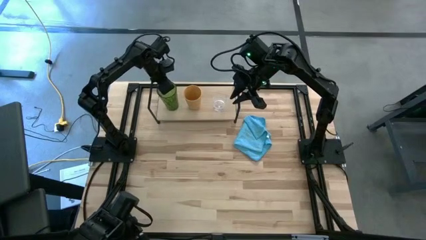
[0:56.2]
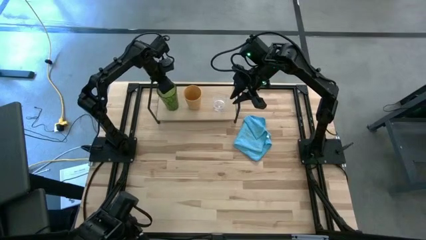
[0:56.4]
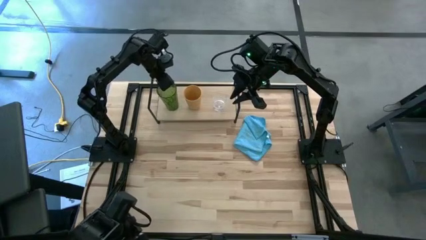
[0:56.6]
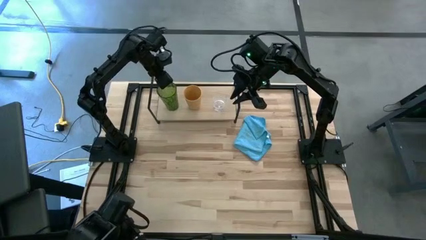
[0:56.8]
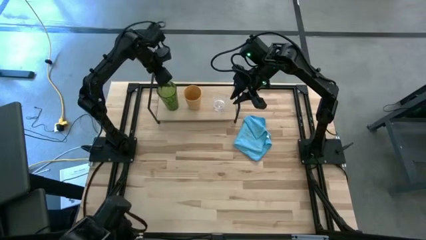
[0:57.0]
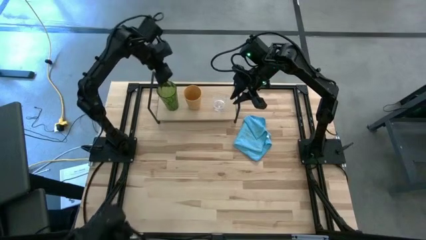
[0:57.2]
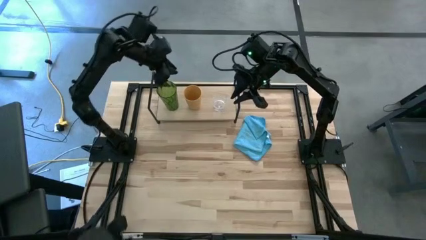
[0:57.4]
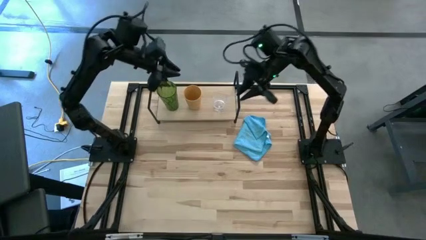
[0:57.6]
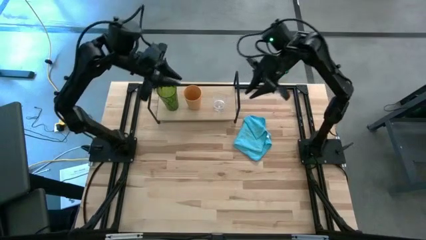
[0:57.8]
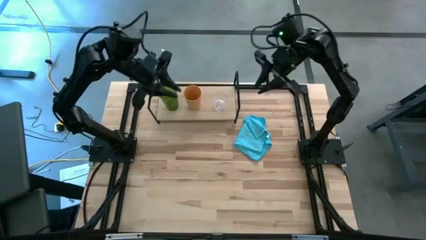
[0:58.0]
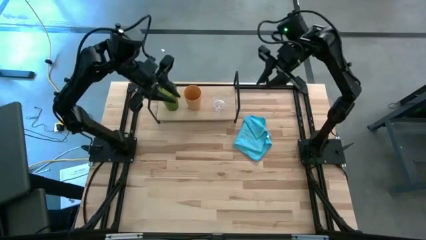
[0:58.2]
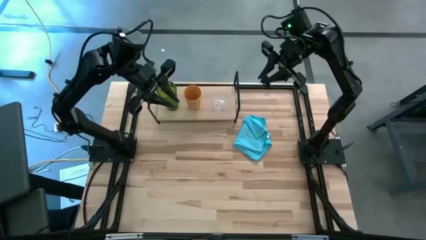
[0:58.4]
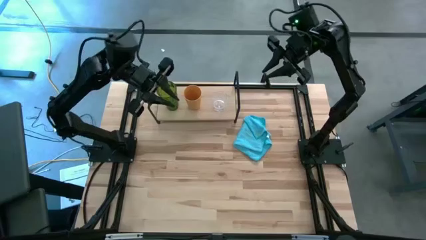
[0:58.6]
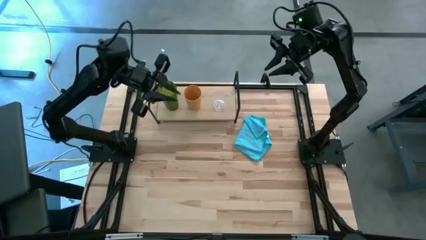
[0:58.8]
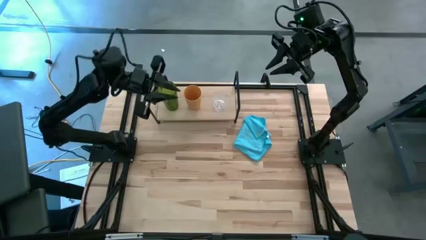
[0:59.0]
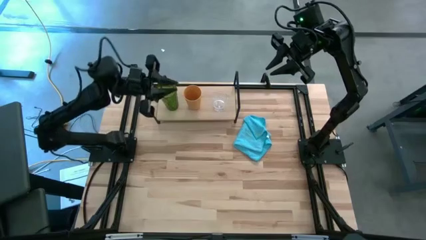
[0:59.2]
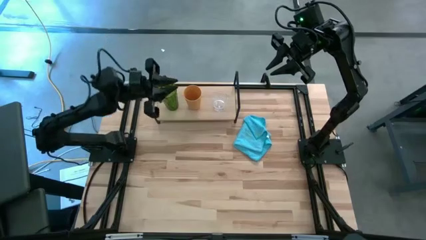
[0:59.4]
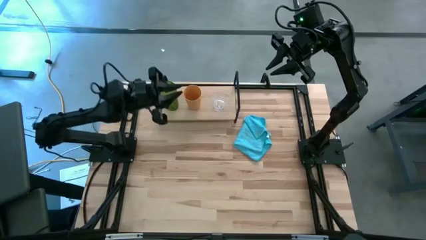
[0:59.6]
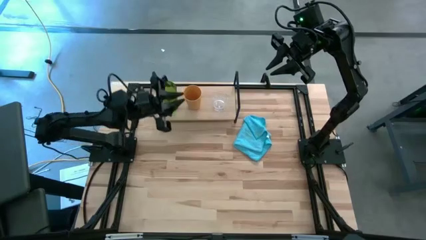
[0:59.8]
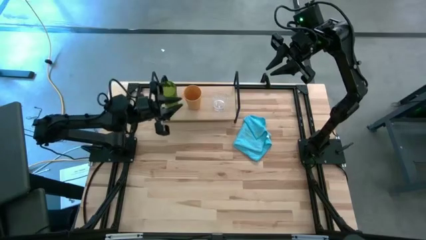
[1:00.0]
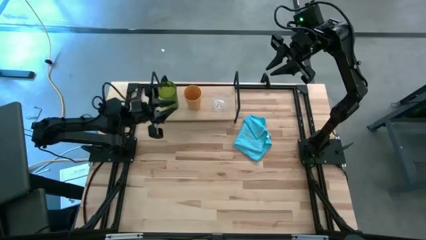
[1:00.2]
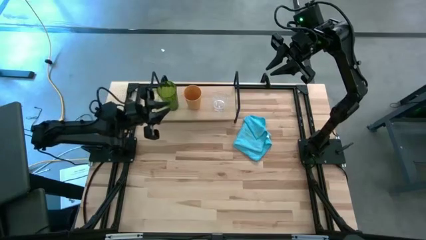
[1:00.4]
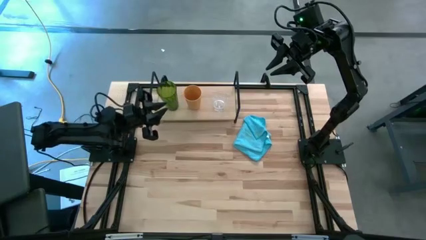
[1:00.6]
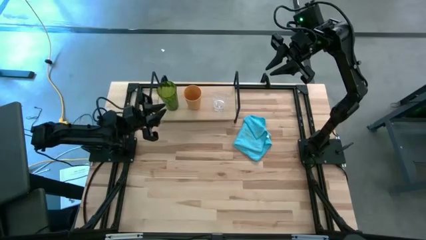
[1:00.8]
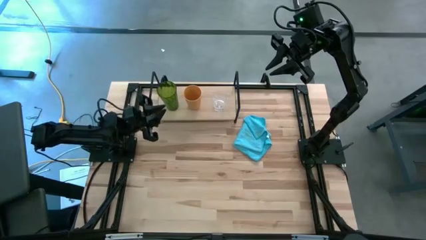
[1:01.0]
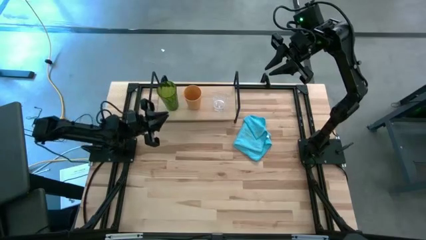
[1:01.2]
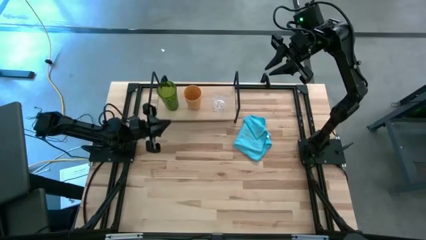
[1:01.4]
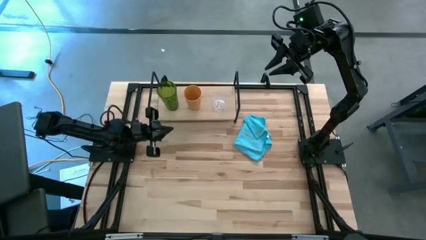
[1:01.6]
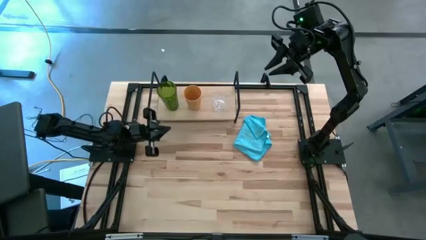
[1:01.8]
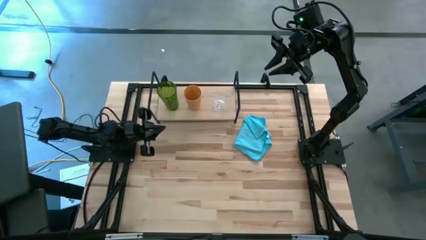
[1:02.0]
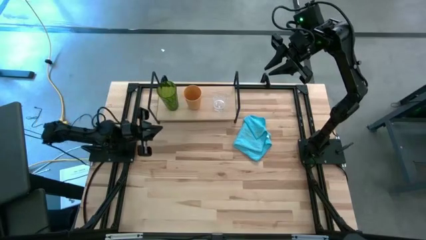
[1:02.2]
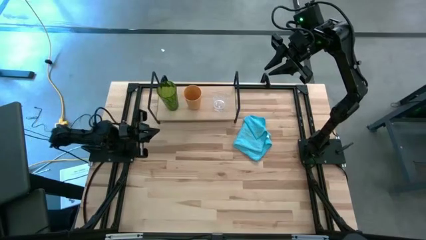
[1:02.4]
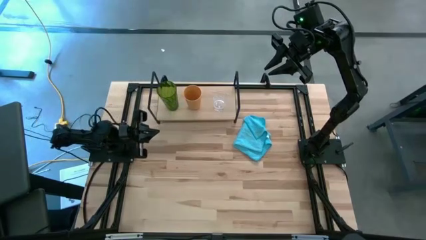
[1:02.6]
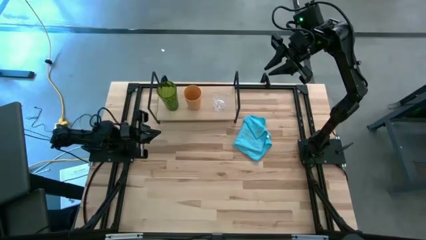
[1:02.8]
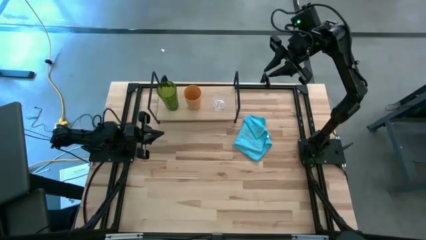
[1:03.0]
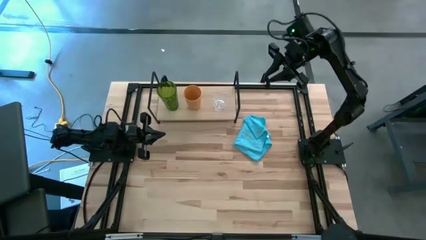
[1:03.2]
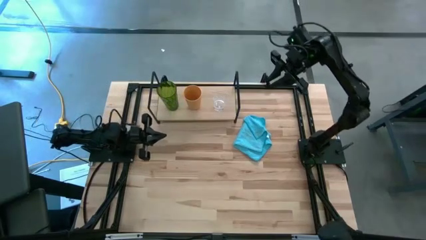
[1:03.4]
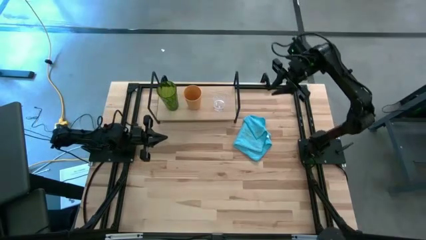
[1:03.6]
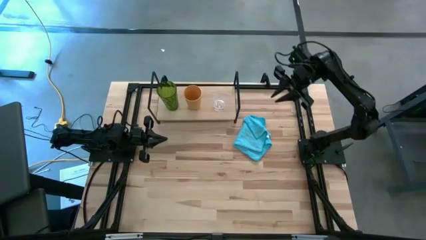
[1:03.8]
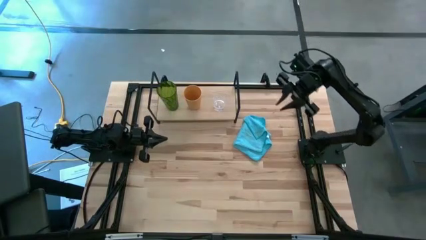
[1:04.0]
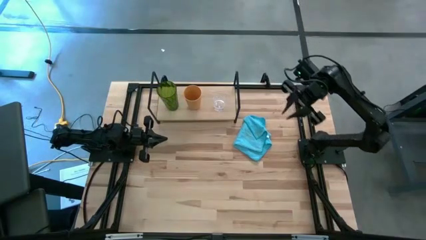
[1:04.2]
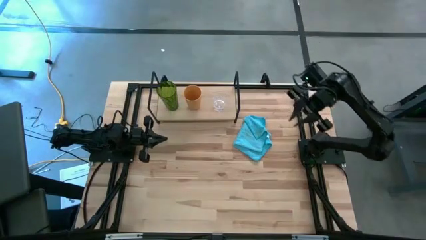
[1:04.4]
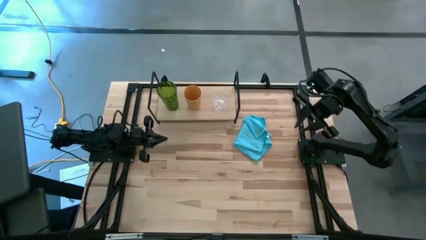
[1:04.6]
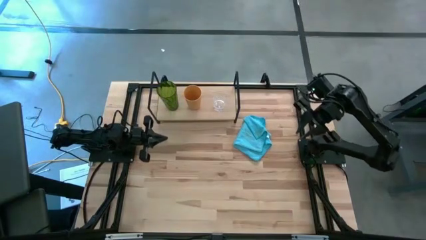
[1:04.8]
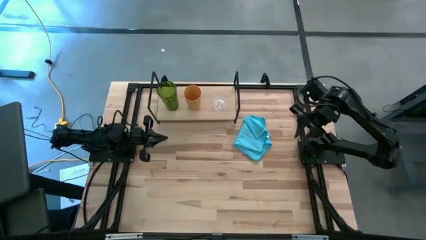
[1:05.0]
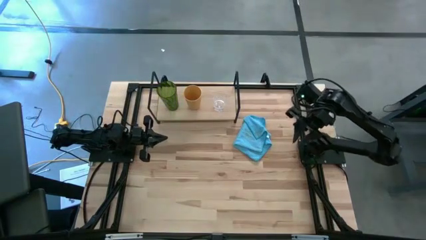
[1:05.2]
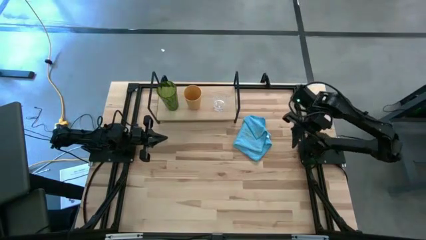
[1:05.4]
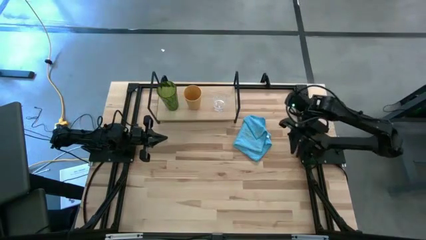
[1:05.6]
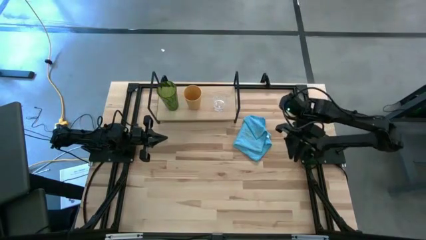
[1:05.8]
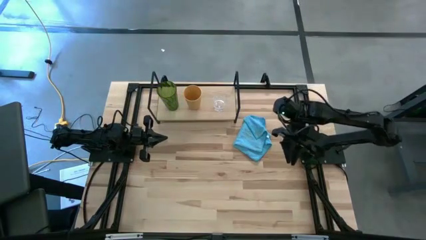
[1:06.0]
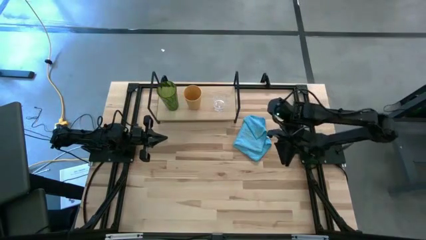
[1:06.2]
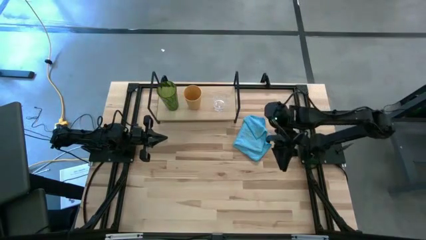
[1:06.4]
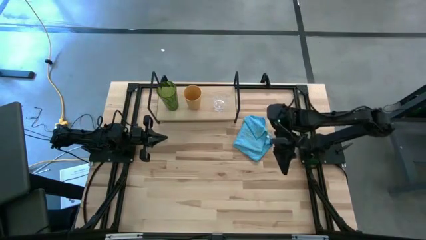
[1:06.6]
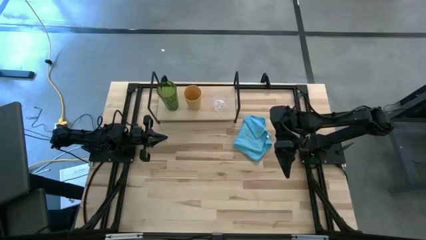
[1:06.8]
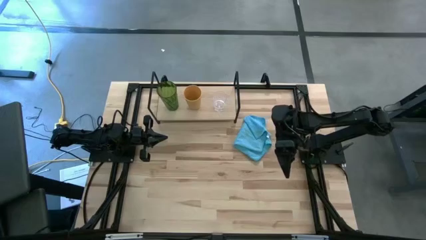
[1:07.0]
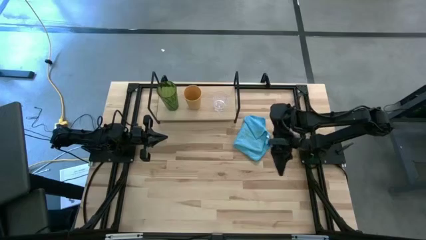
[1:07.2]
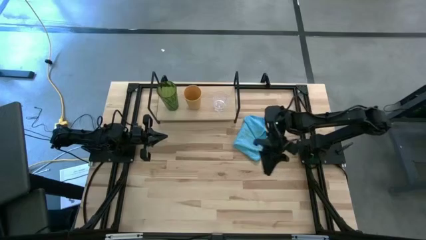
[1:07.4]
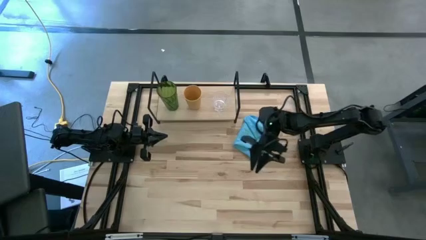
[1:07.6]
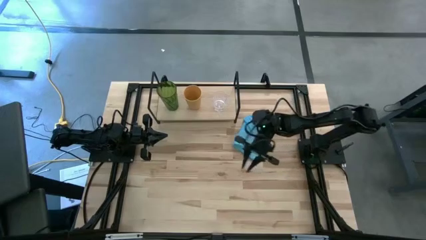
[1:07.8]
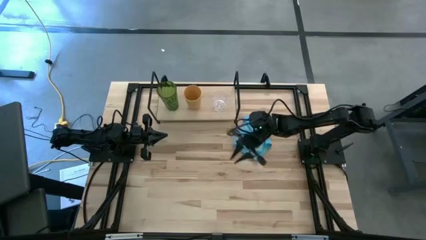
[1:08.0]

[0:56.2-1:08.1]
Task: Stack small to large cups/mugs on shelf
Return to Home Position

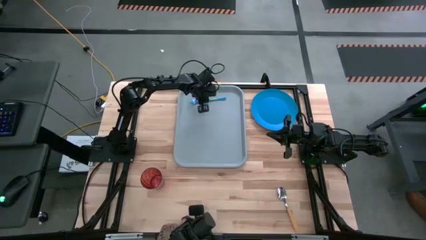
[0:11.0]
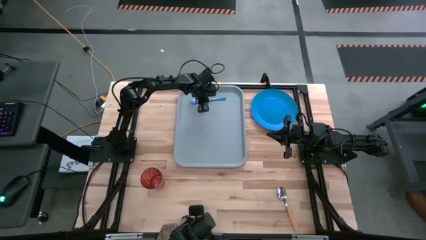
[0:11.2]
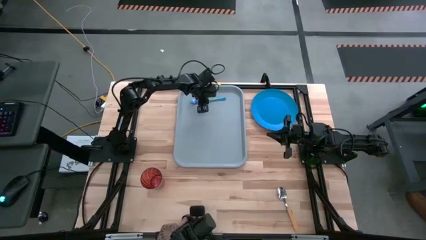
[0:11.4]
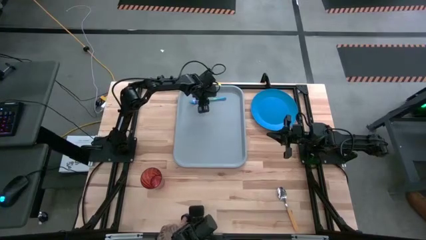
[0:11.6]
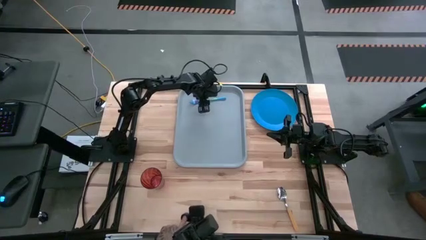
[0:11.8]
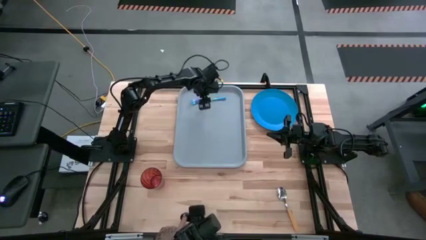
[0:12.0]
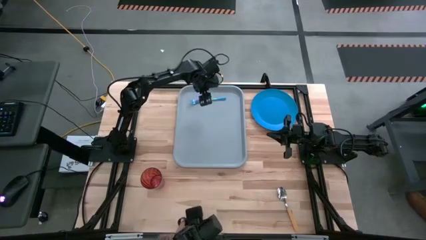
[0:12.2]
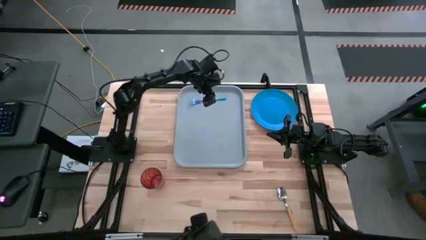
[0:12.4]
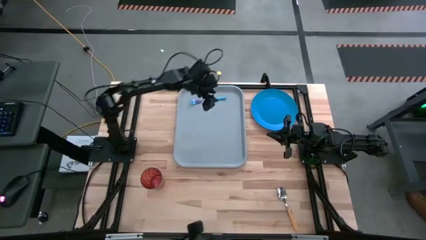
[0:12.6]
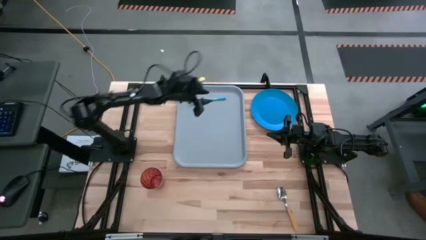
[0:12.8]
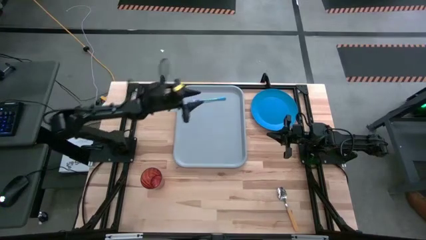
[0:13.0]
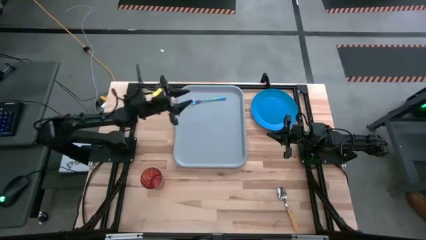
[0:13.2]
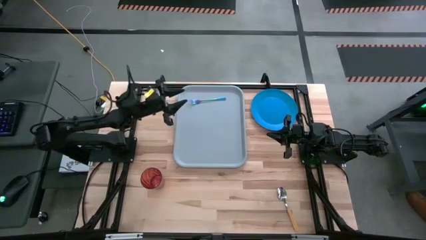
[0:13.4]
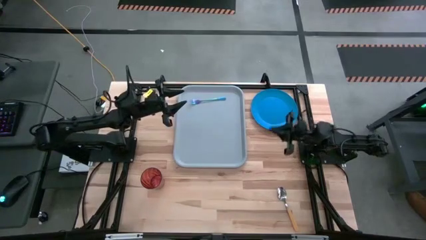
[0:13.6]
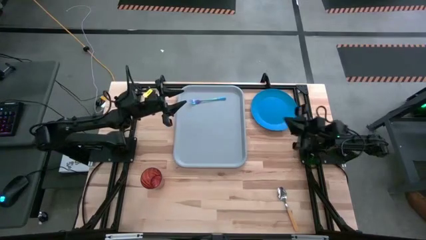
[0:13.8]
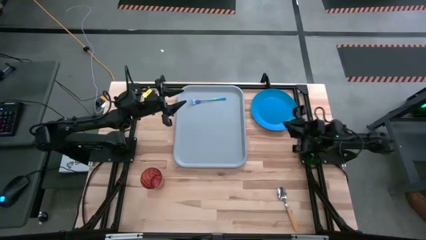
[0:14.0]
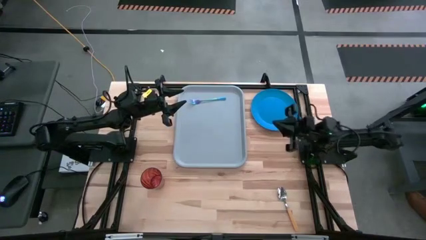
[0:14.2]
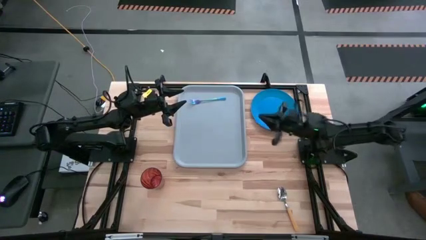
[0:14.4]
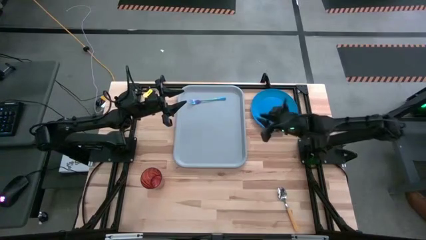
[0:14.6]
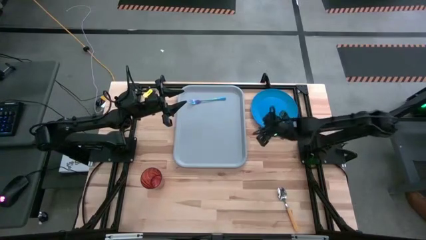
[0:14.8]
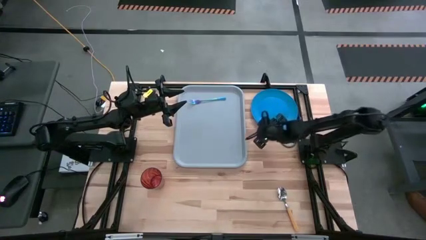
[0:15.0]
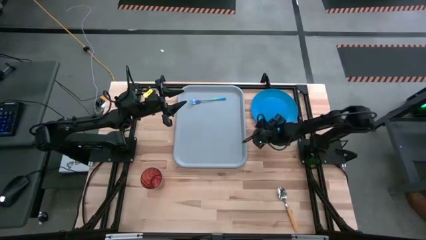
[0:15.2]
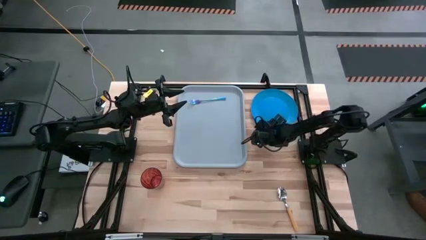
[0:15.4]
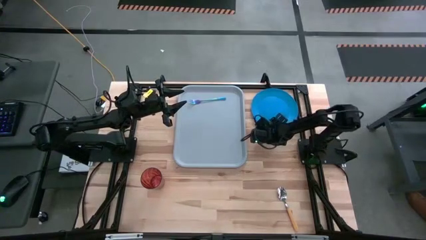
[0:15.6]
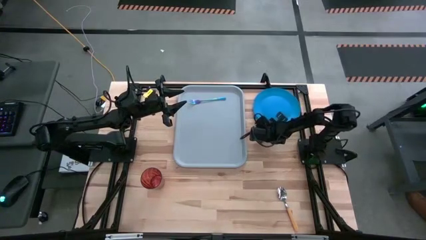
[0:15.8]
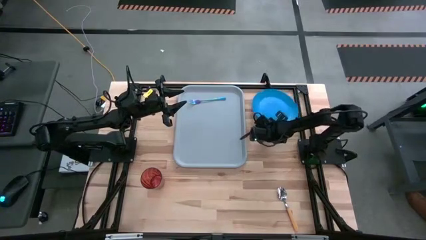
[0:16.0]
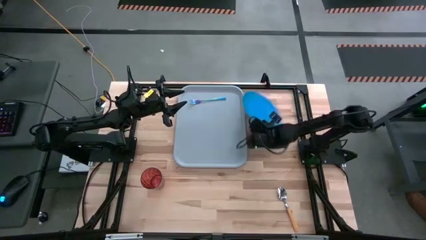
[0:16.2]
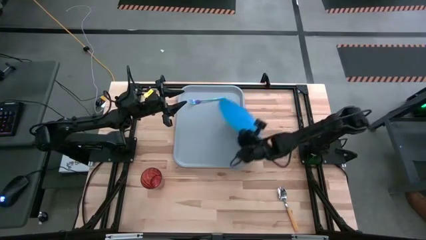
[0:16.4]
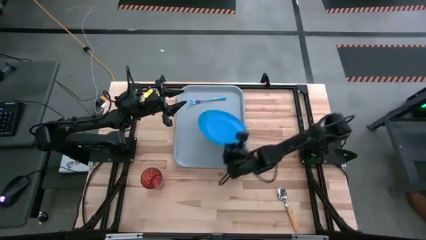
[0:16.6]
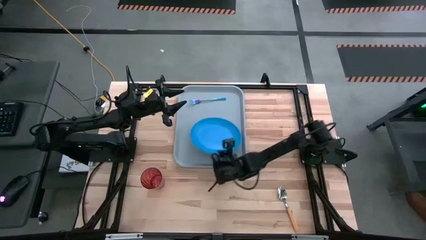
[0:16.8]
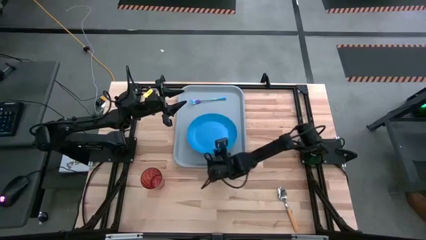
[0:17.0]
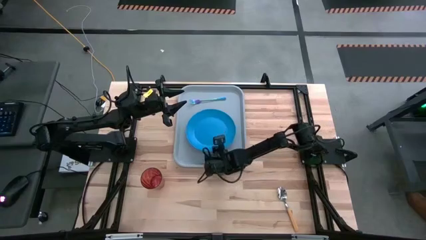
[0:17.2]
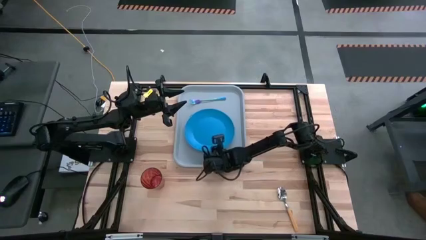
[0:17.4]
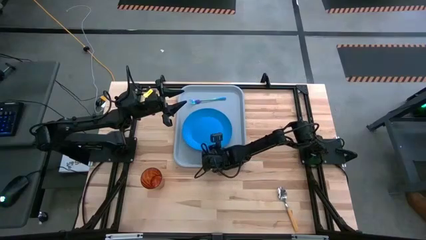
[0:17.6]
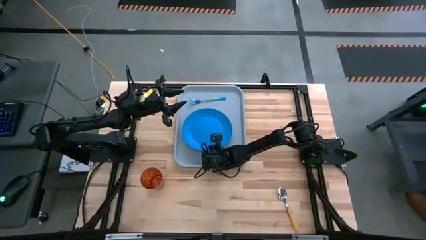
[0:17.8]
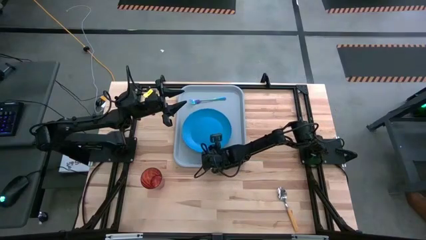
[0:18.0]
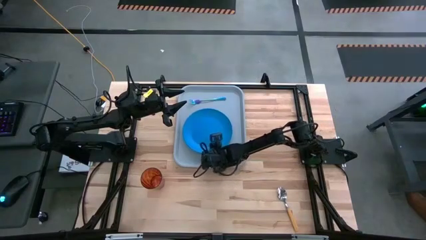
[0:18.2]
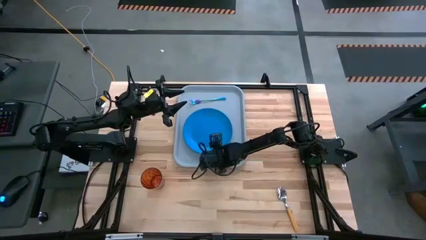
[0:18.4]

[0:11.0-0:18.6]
Task: Pick and place plate/cup/fork/spoon on tray
Put the blue plate on the gray serving tray to the left of the blue fork
